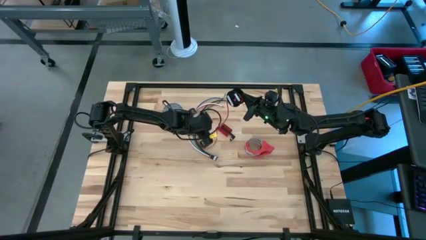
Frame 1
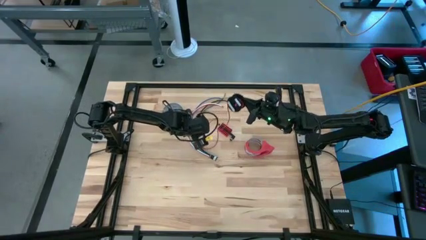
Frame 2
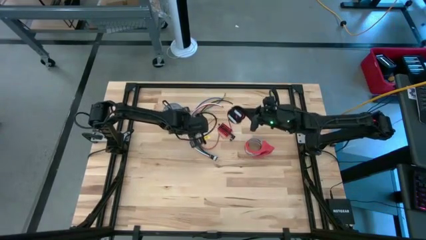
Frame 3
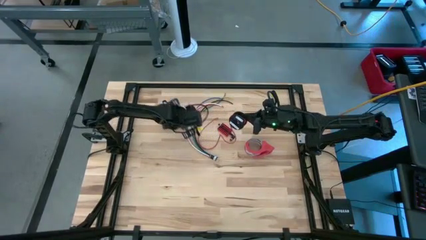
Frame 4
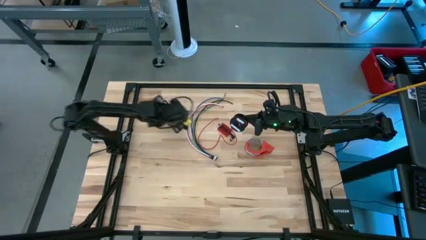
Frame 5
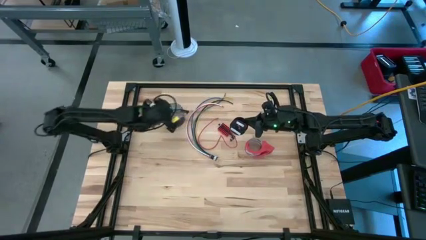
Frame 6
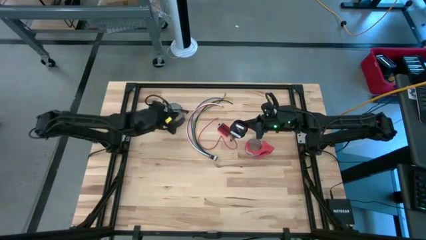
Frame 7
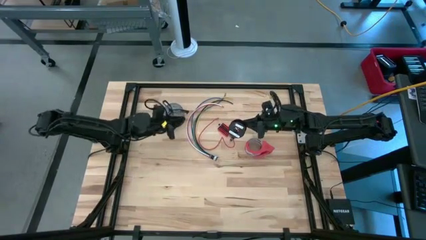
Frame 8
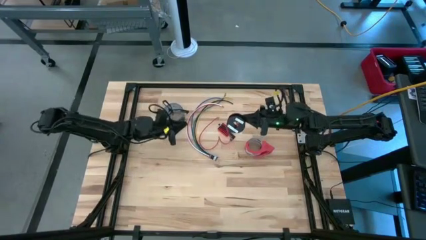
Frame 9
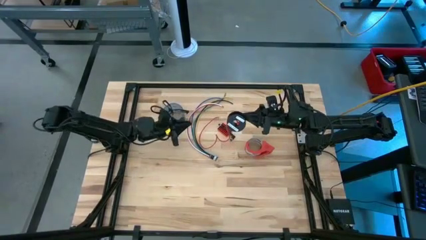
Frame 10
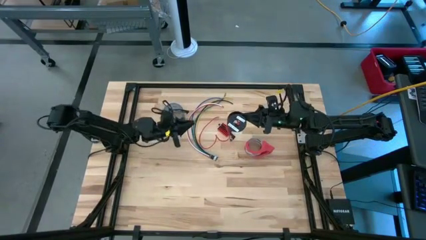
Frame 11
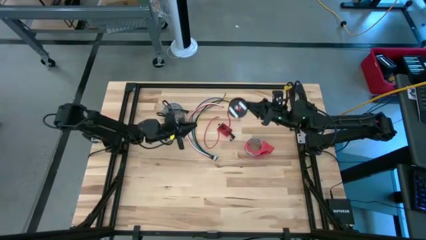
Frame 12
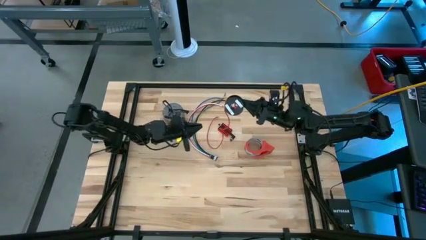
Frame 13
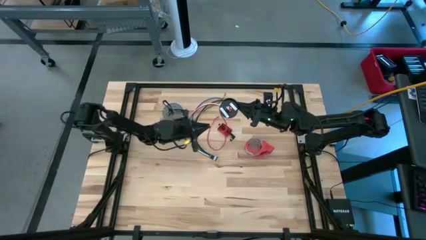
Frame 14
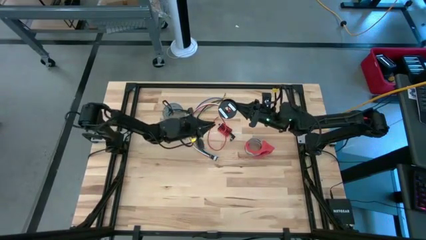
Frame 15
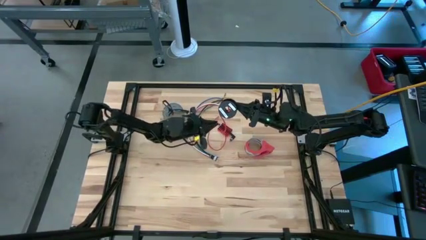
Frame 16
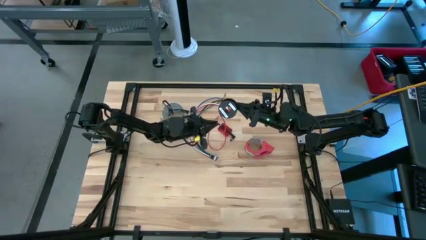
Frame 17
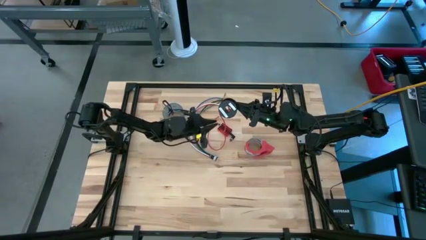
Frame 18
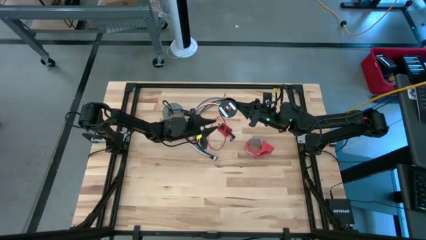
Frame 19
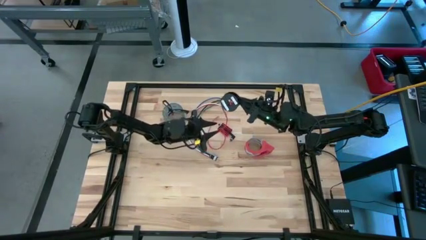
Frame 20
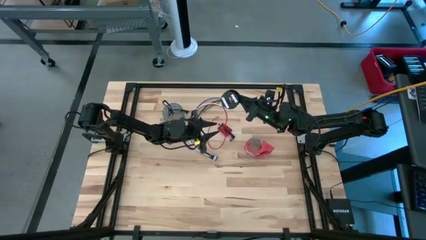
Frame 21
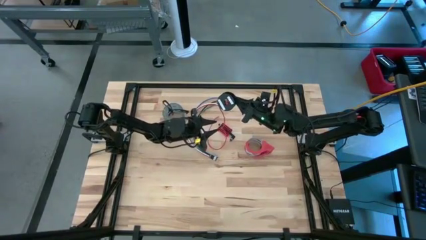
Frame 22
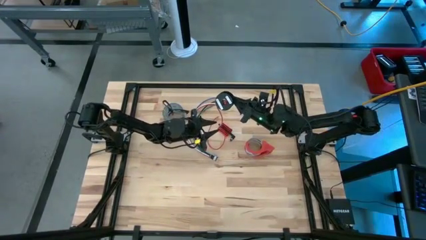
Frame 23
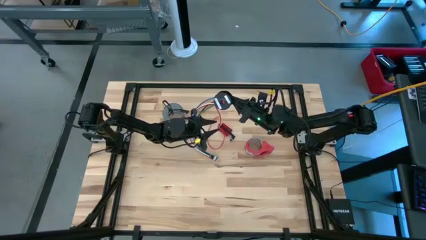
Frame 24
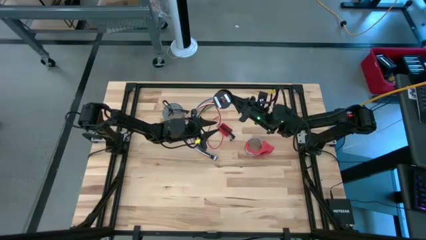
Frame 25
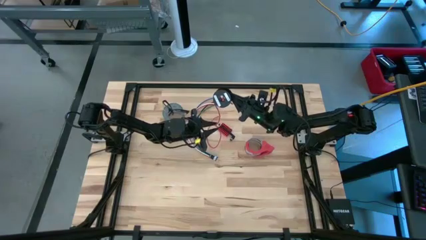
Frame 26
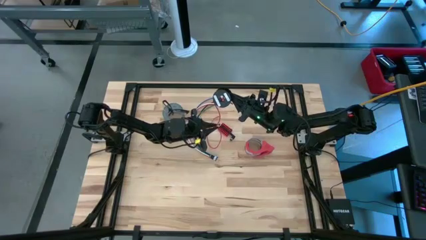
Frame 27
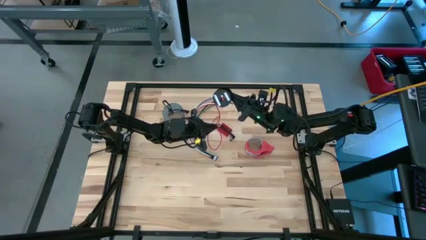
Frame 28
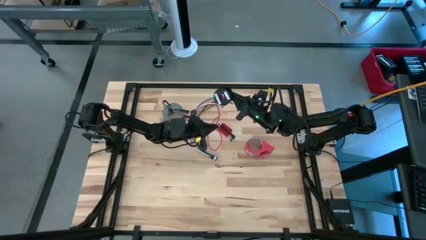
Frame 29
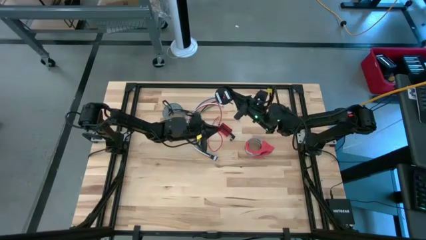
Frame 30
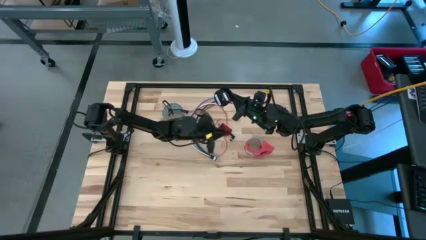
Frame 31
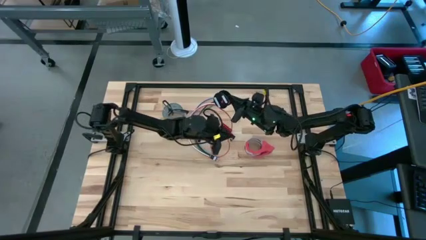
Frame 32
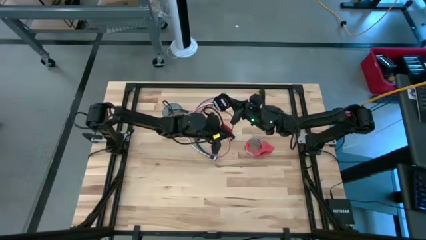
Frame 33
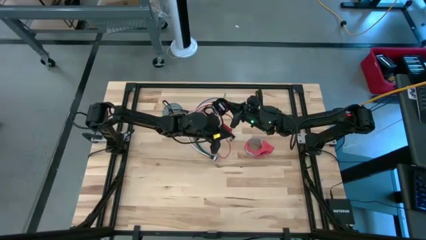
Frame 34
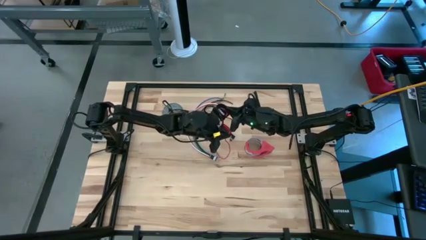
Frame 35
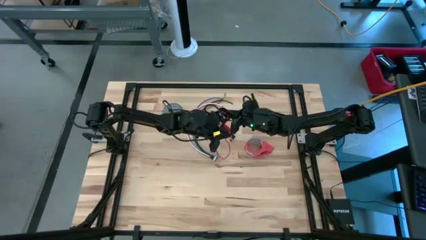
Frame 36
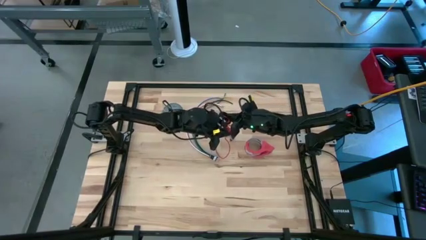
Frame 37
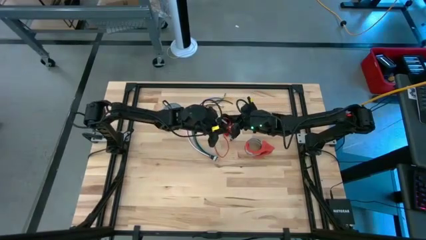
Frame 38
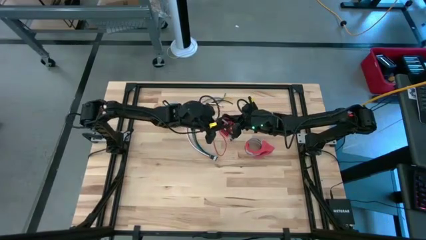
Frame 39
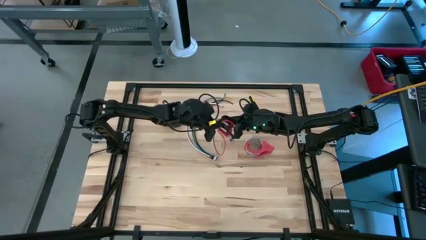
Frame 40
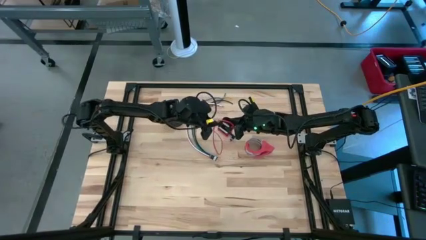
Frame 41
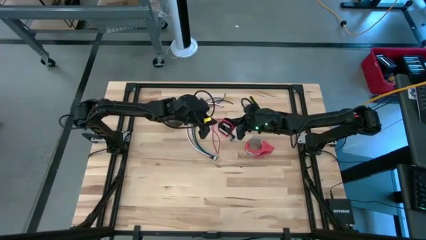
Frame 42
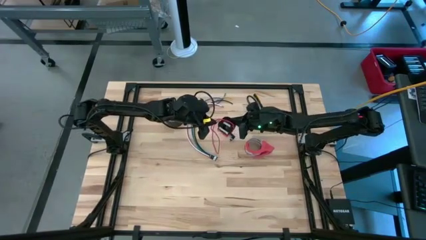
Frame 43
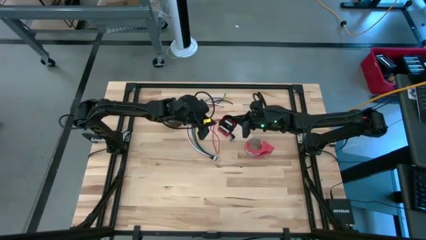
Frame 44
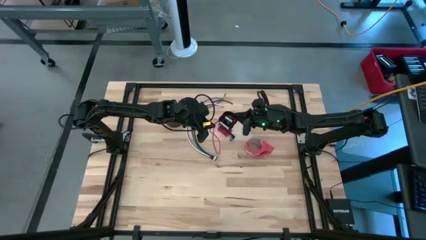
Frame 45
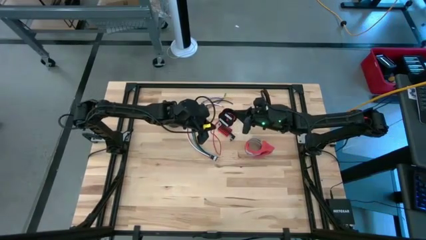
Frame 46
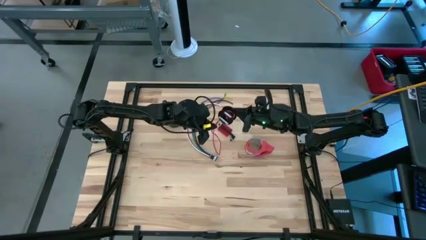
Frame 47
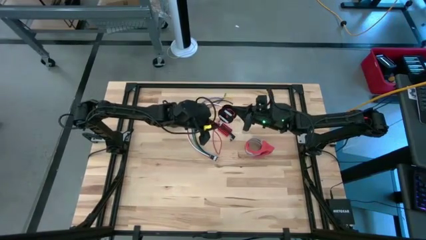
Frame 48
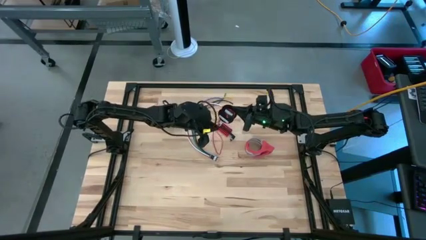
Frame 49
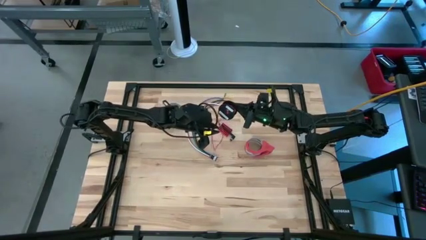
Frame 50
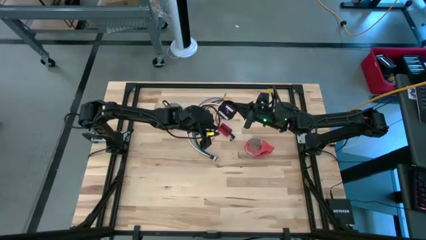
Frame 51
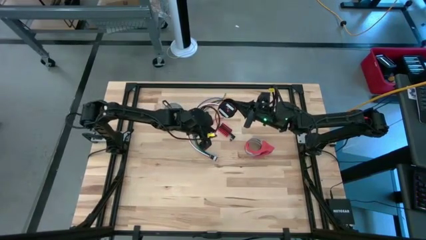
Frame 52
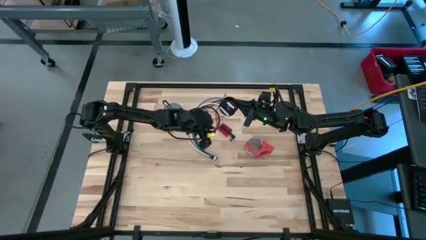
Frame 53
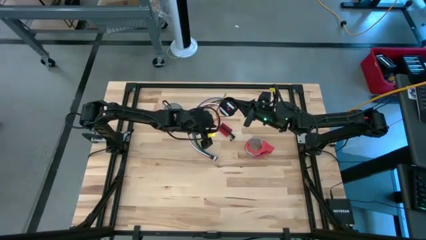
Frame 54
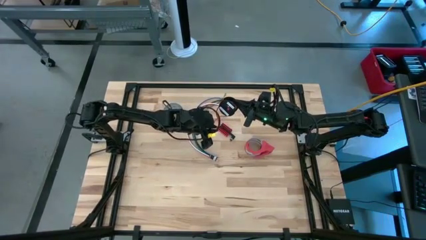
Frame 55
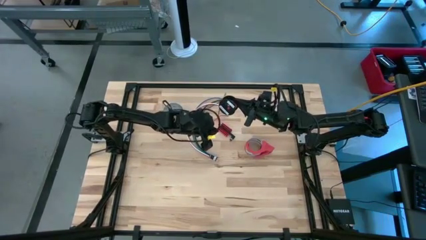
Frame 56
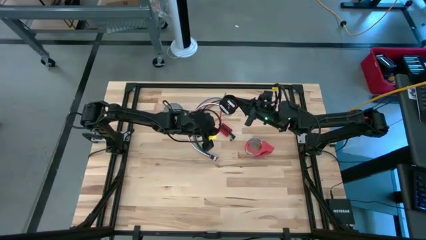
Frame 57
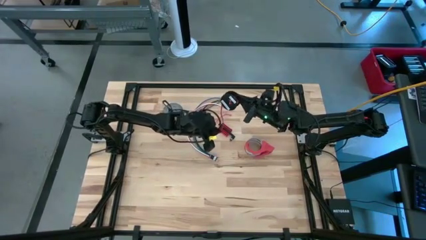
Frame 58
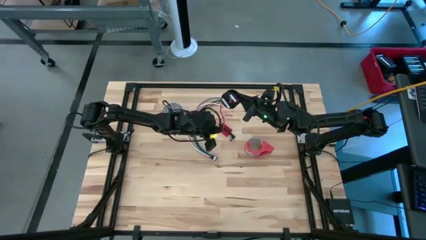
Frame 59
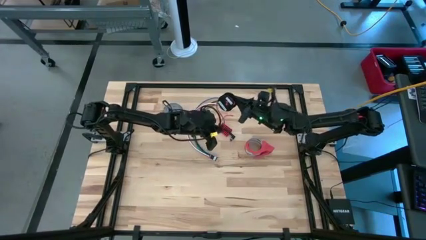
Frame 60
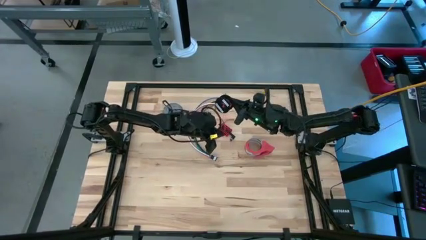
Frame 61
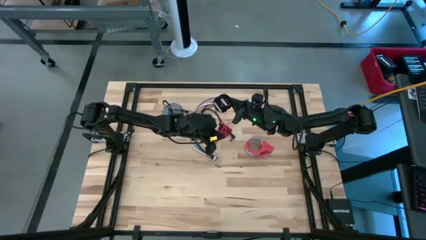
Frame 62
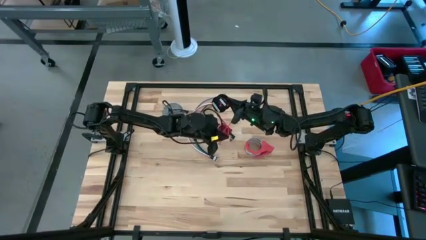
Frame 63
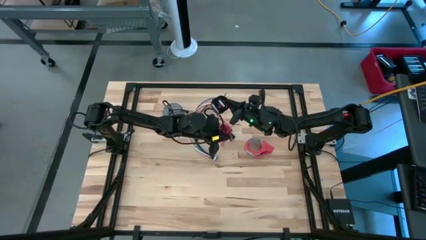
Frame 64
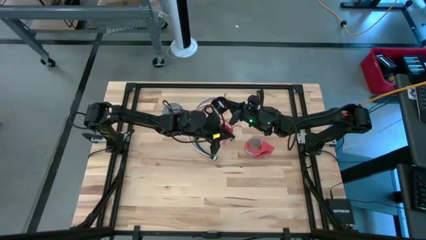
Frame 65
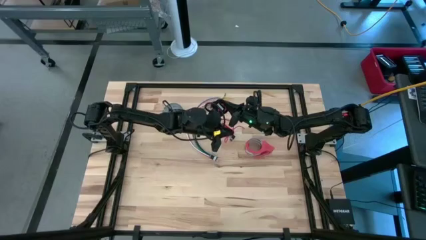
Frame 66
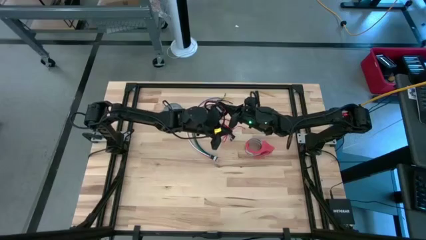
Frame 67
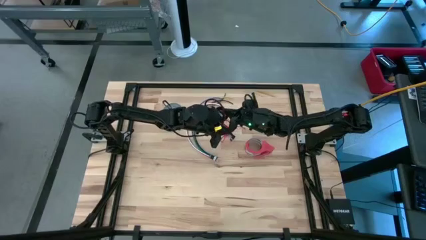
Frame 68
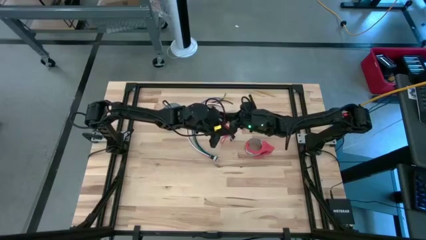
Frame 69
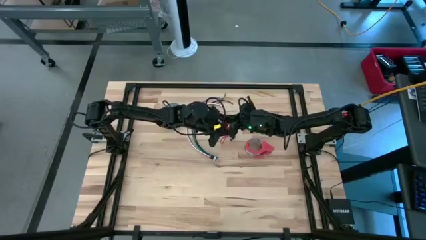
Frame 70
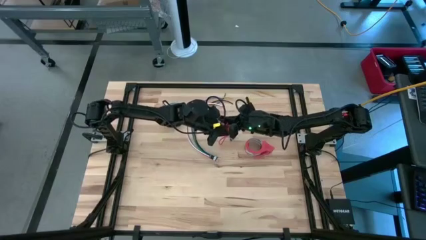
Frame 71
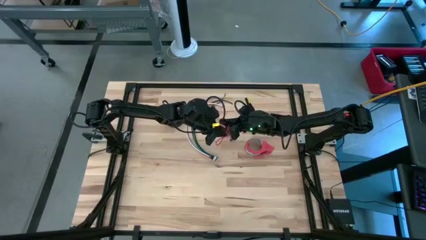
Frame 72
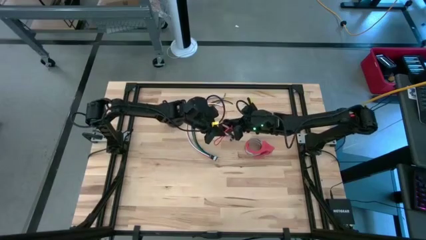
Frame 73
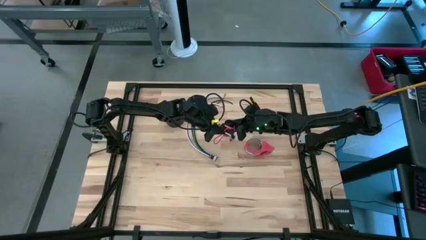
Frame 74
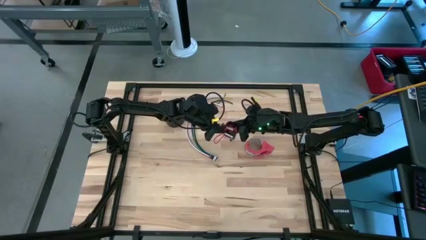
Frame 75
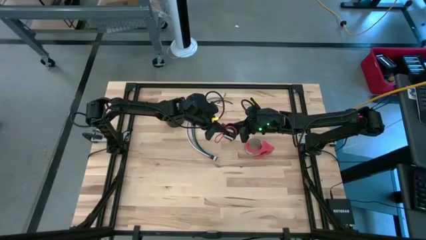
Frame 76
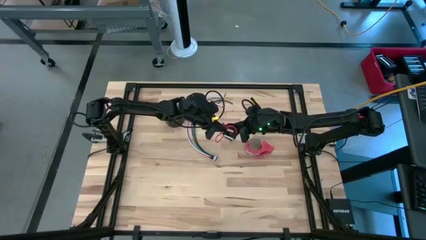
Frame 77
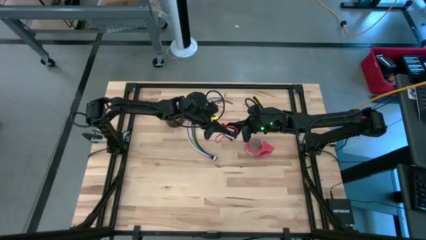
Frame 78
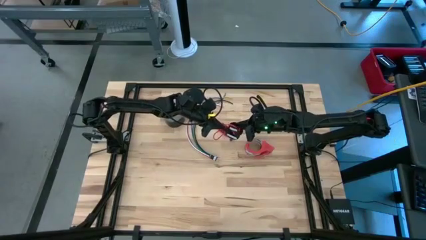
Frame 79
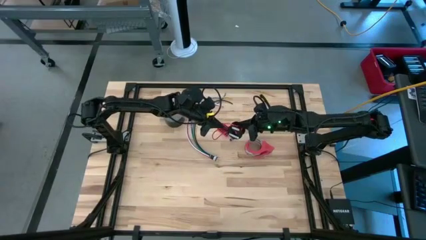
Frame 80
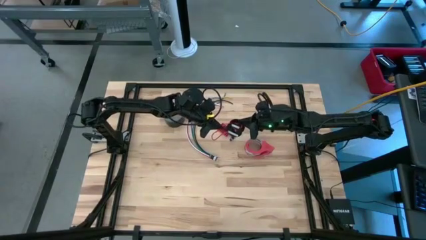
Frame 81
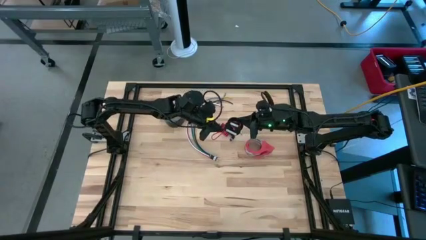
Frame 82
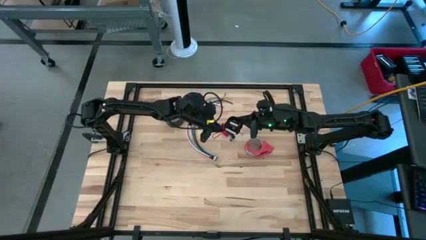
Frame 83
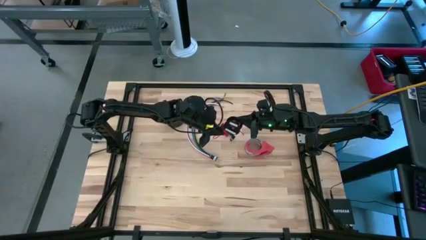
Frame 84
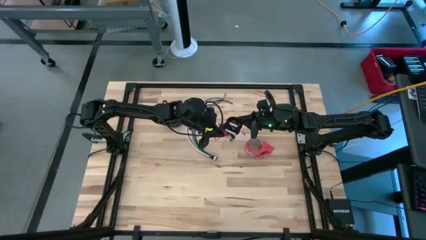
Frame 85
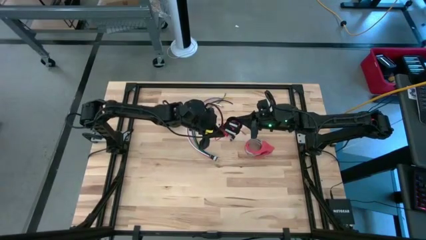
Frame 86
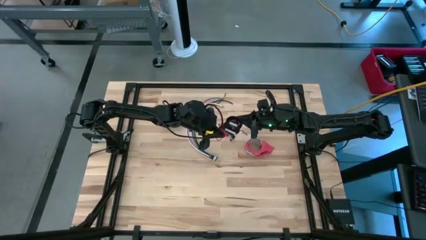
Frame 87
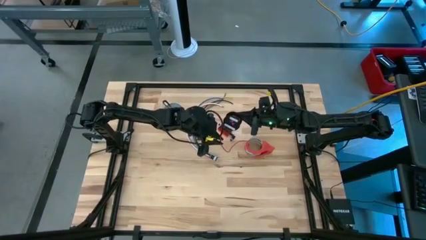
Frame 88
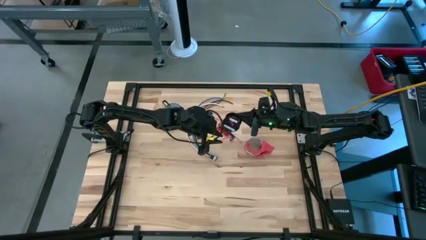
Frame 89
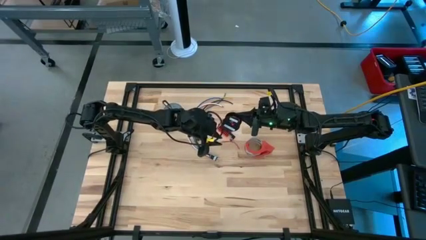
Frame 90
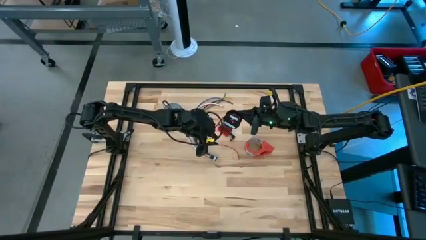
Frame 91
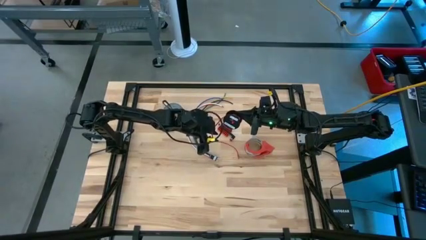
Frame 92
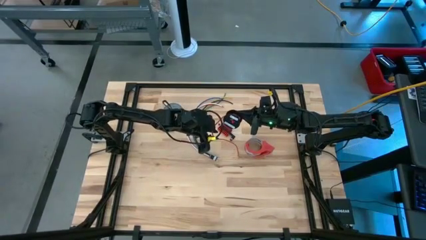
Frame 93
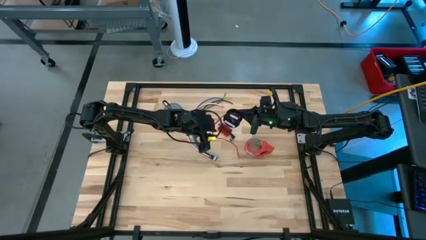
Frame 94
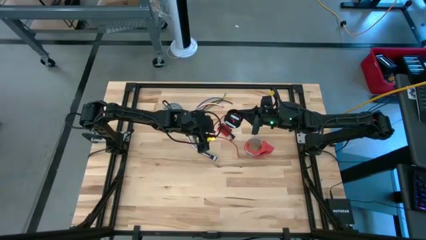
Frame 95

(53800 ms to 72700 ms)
Task: Coil cords
Coil the red wire onto the spool
